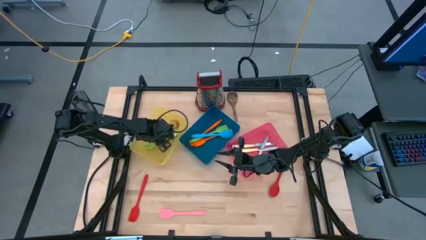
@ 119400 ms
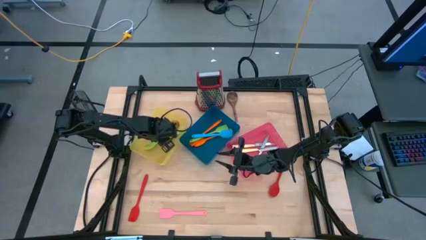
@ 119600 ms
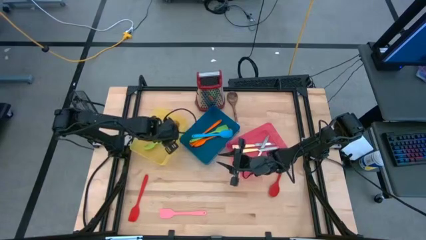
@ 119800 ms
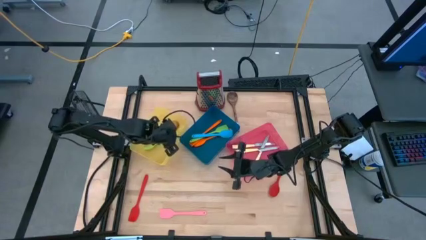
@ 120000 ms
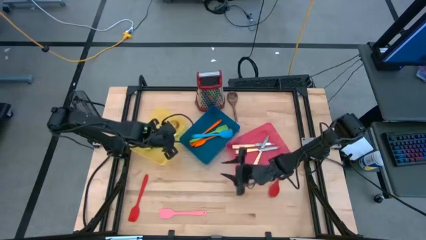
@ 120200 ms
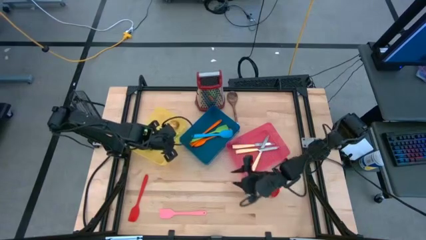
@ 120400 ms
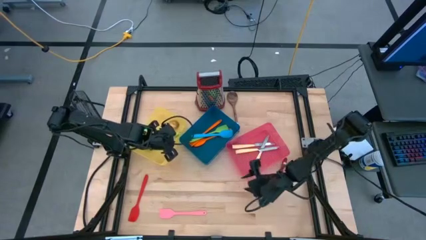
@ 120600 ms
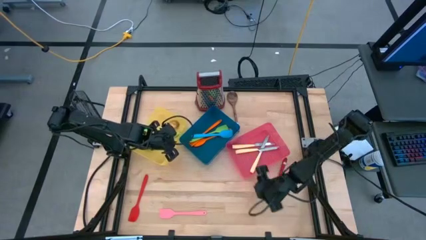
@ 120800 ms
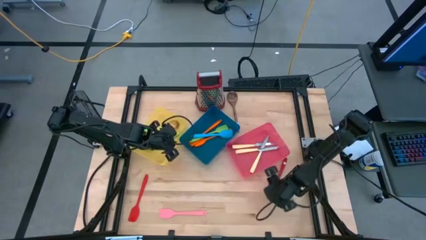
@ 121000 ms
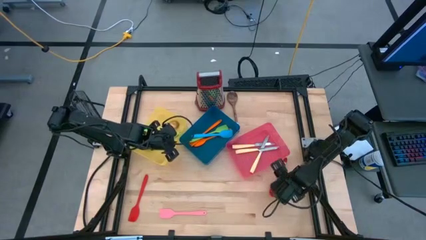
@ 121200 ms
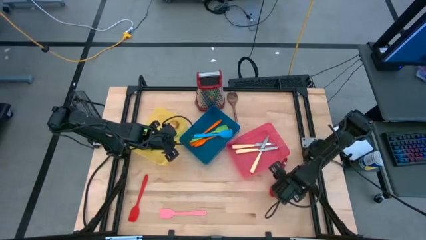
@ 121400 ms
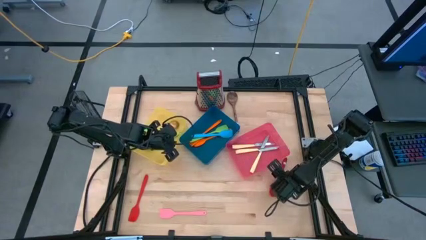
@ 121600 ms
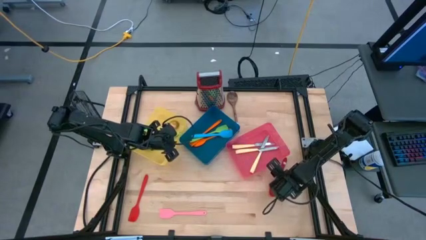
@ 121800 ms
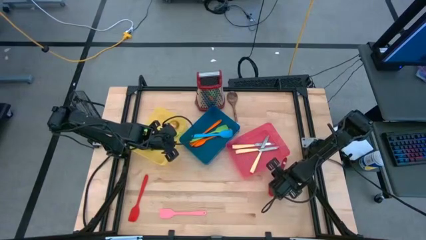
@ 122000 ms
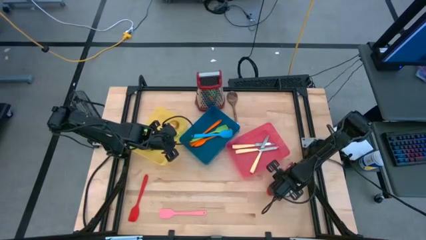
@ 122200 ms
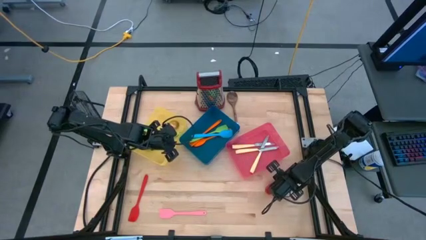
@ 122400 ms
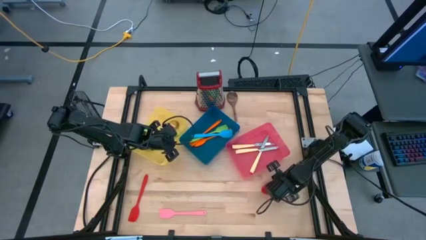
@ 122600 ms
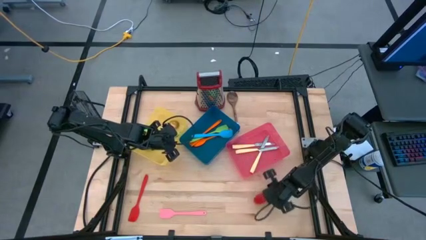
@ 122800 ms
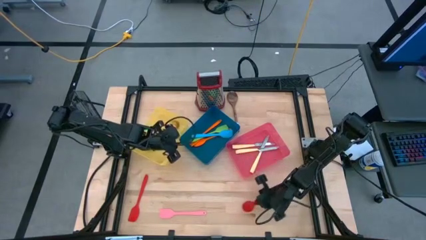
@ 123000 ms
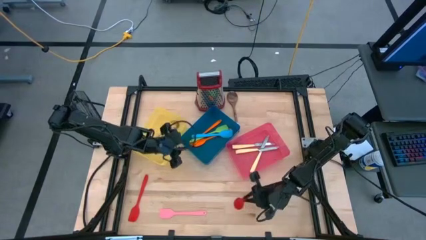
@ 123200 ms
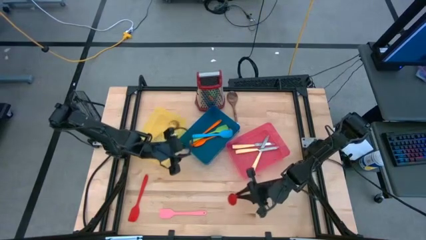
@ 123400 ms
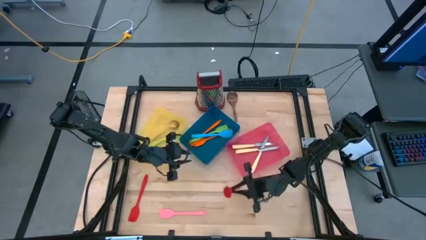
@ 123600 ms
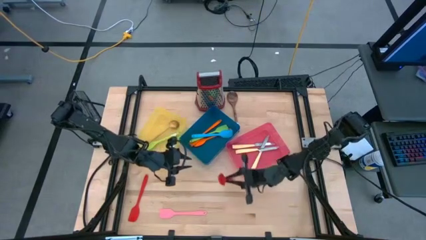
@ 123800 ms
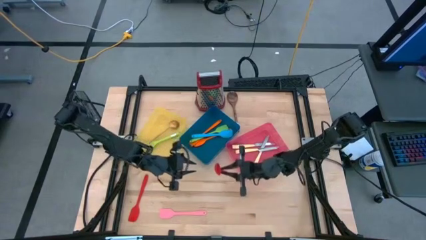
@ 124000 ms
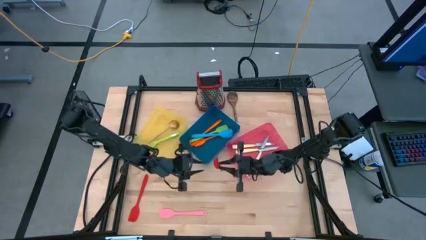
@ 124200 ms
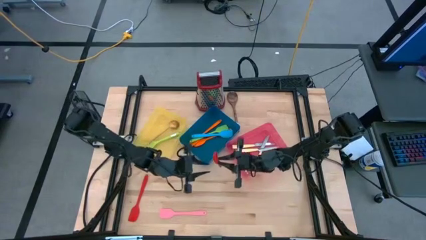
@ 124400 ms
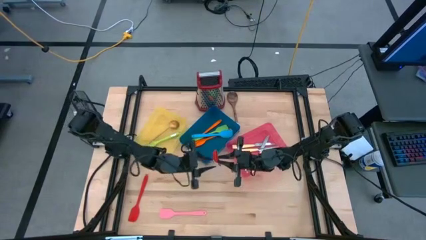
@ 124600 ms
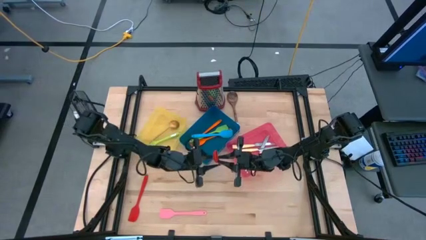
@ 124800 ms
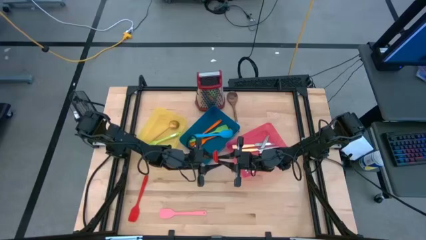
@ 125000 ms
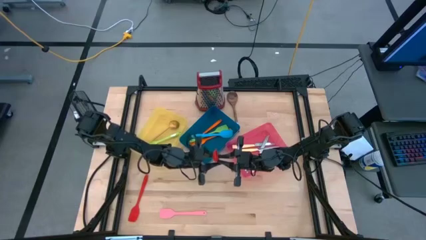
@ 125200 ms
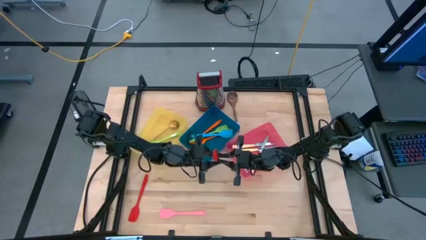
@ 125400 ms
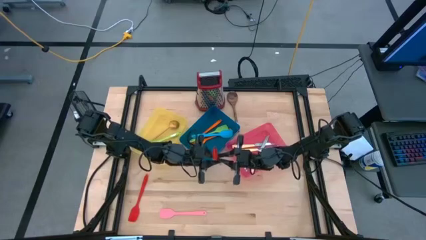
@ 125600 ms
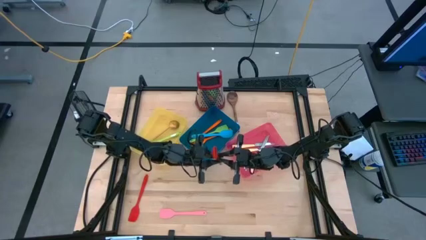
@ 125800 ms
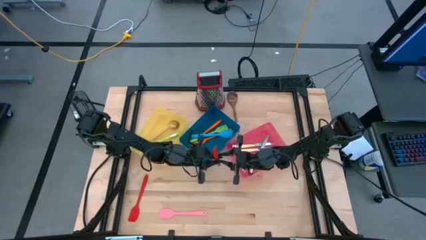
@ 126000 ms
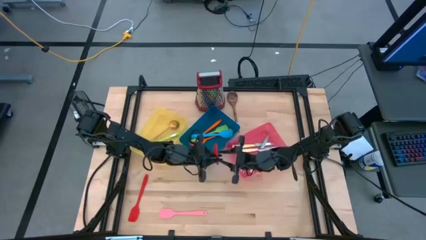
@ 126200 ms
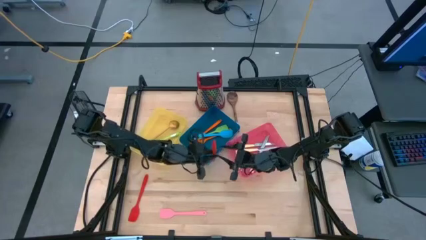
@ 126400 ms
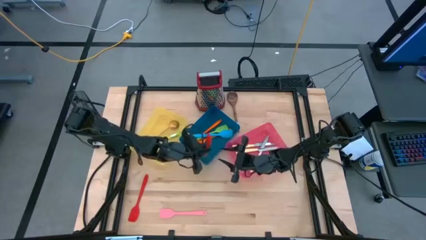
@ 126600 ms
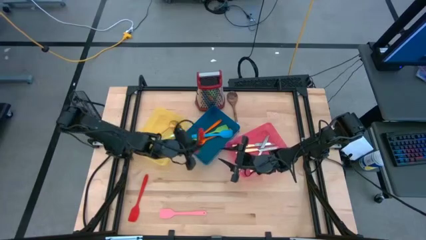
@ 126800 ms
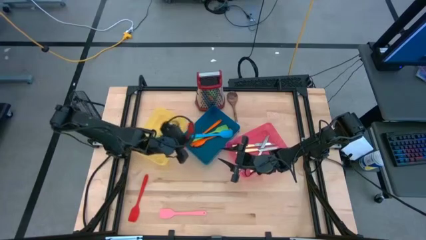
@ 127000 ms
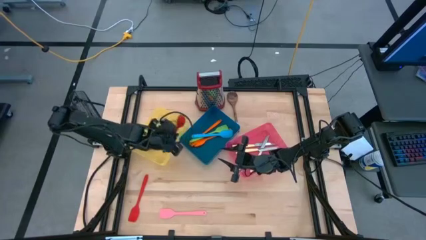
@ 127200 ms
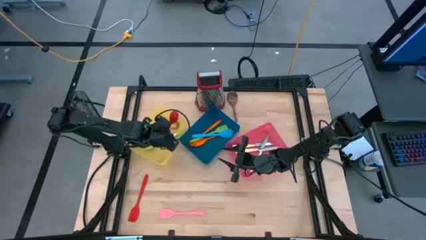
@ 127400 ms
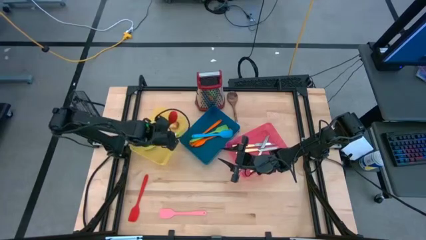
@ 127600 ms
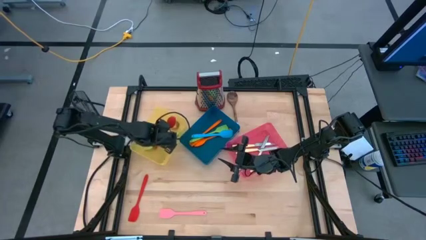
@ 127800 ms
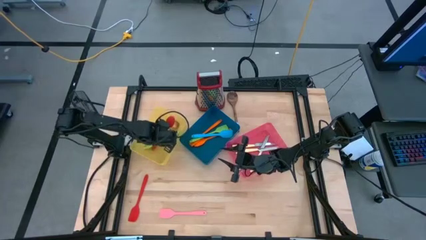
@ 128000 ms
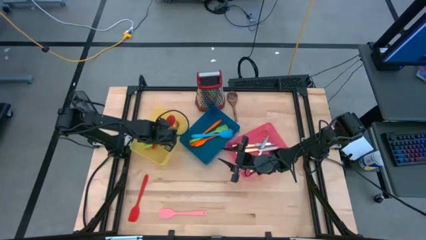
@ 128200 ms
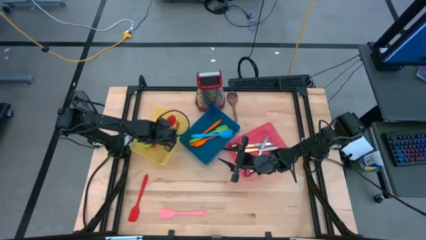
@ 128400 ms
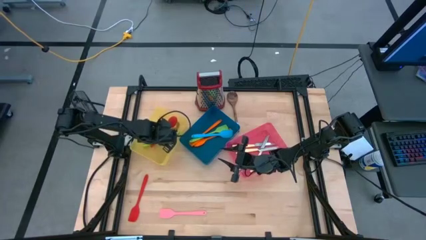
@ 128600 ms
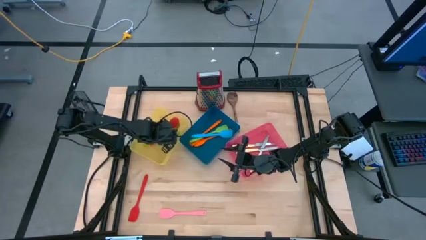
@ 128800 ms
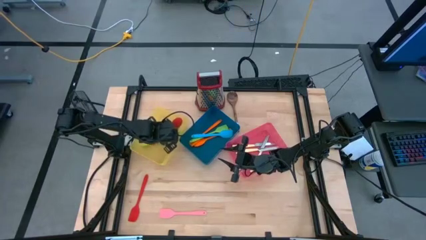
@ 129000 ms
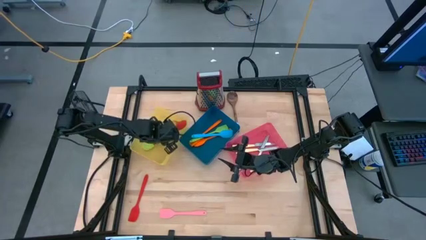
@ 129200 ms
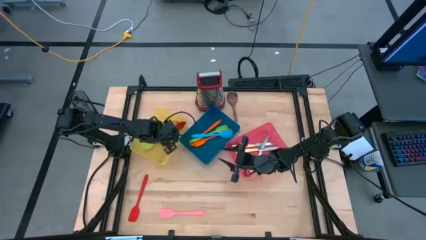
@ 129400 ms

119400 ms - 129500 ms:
Task: Pick & Place Kitchen Items
Put the red serving spoon into the yellow bin

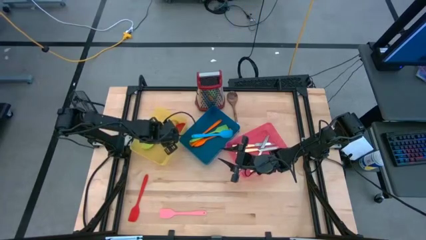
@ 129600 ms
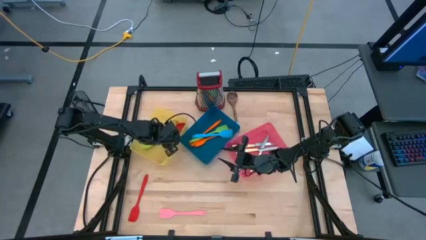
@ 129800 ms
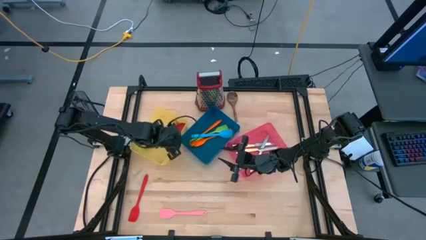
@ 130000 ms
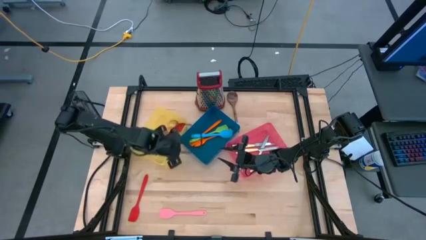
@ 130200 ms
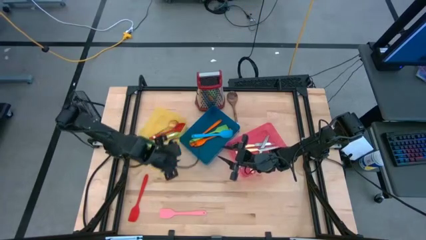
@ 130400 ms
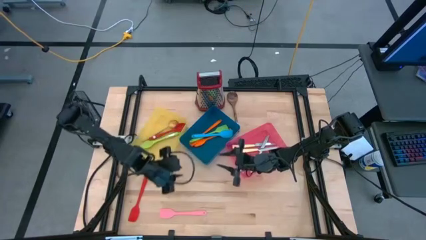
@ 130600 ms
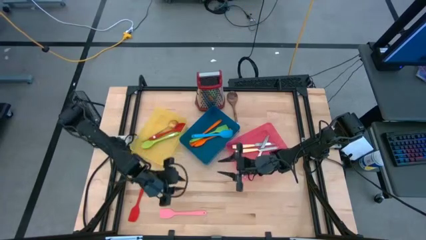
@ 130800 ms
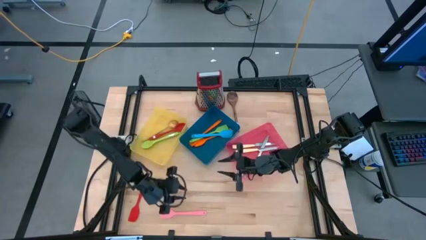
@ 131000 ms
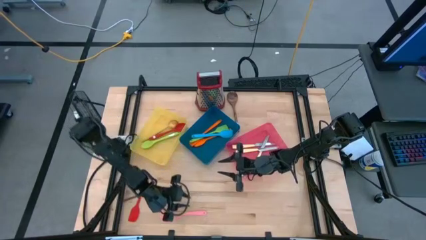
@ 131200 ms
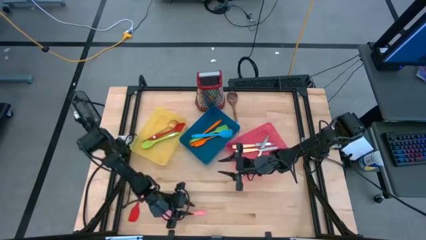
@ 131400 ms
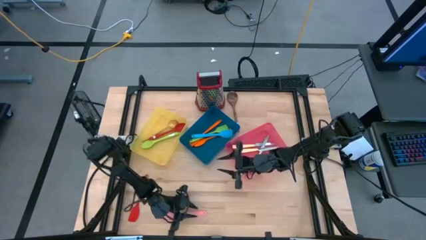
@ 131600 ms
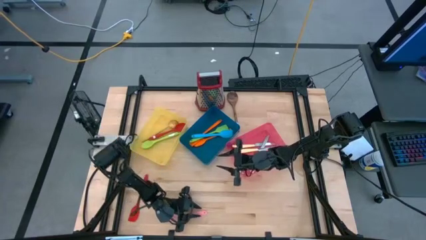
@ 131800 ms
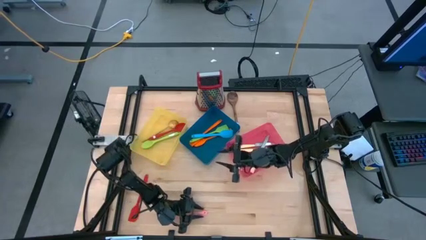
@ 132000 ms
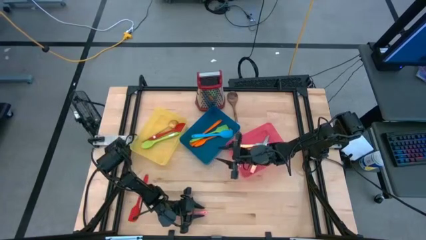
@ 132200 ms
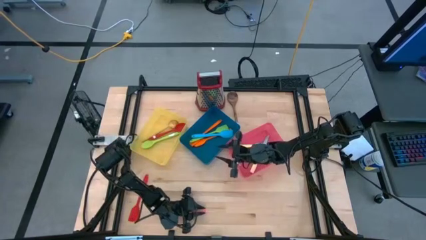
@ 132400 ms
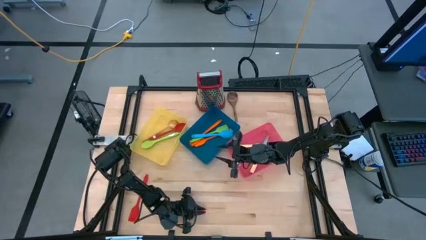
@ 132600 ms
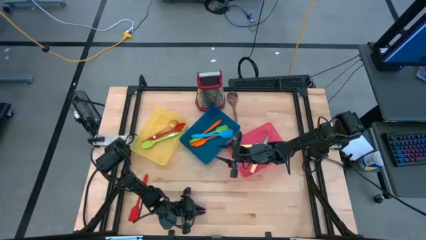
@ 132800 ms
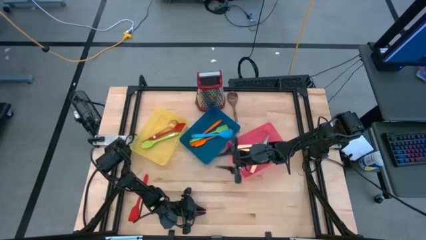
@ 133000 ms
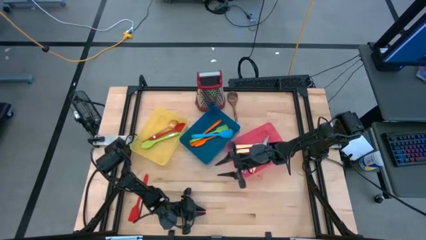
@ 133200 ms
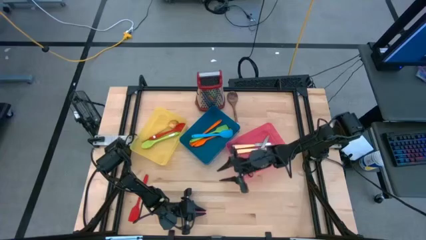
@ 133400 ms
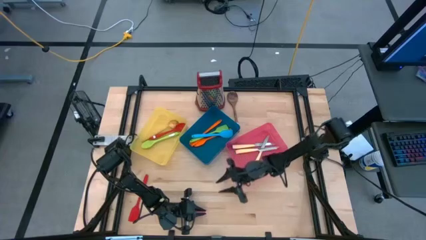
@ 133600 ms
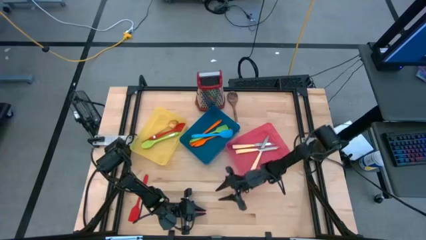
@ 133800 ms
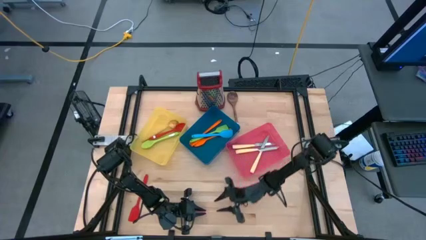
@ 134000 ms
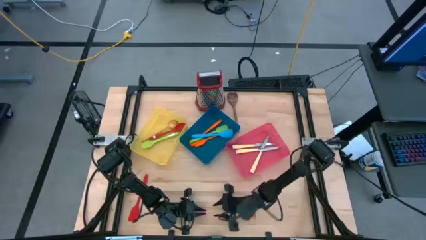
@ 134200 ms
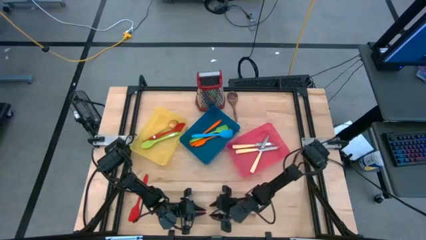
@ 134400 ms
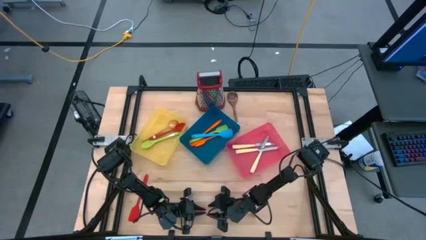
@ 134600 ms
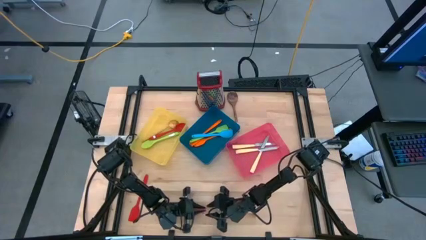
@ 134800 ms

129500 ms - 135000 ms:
Put the pink spatula into the blue bin
